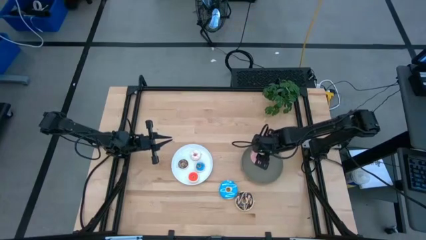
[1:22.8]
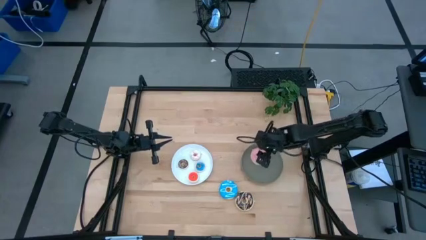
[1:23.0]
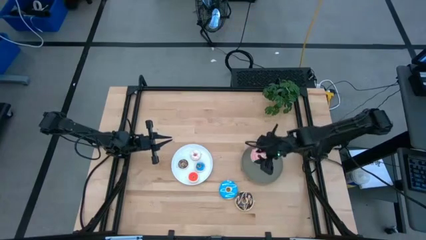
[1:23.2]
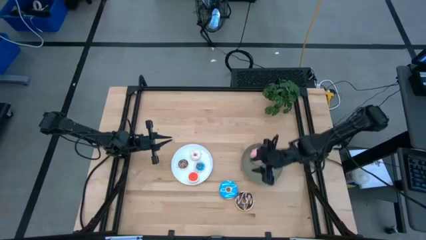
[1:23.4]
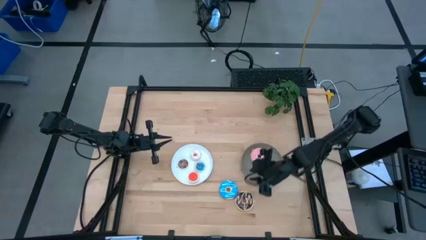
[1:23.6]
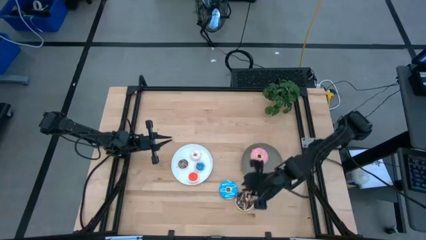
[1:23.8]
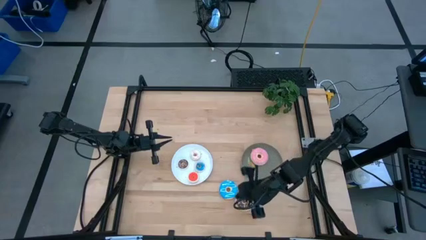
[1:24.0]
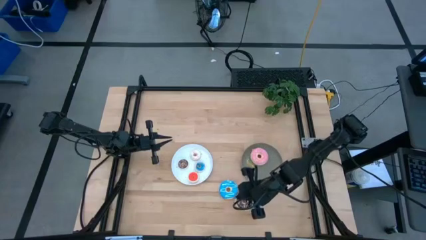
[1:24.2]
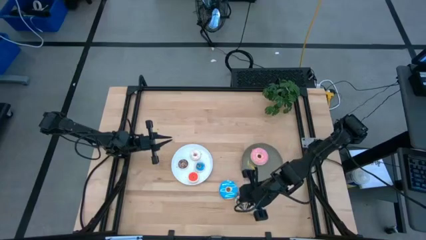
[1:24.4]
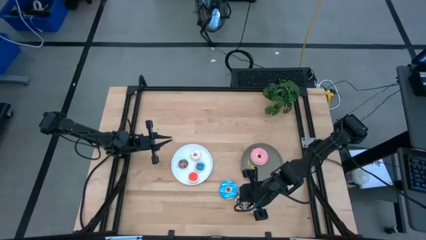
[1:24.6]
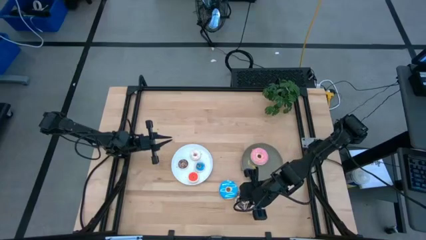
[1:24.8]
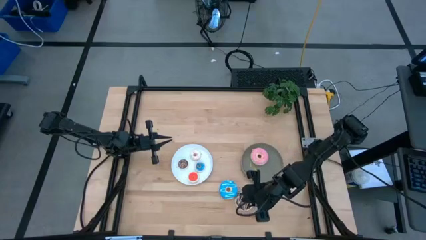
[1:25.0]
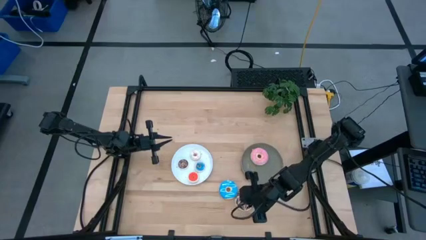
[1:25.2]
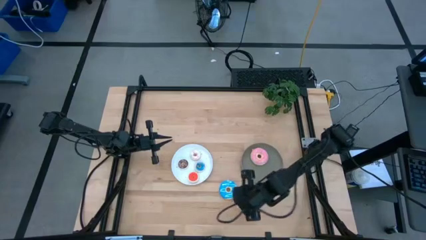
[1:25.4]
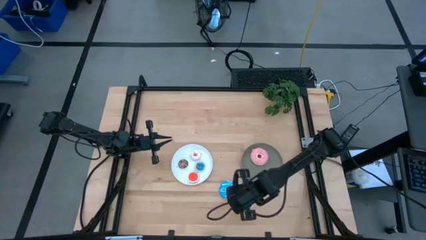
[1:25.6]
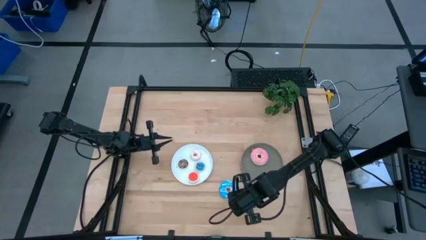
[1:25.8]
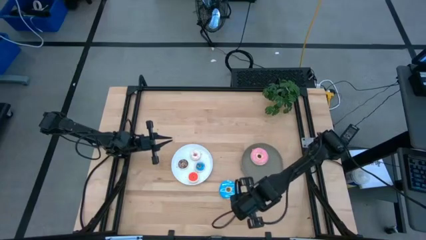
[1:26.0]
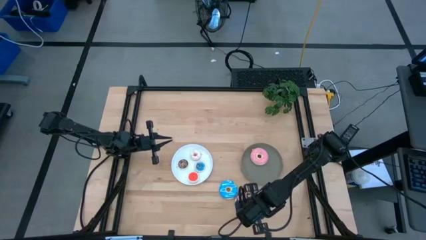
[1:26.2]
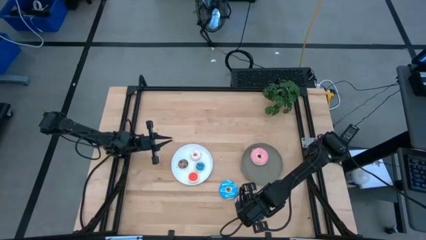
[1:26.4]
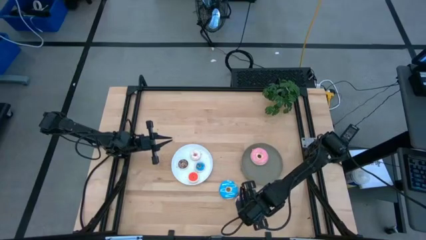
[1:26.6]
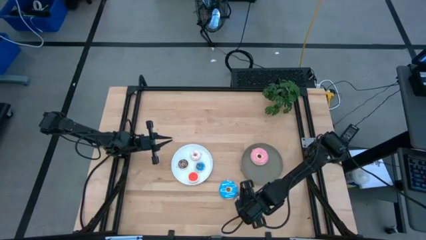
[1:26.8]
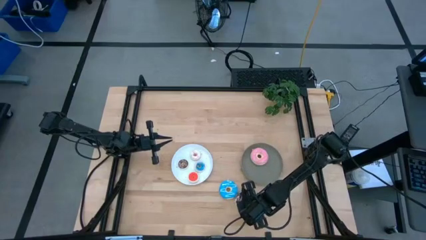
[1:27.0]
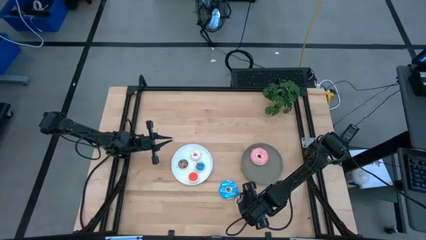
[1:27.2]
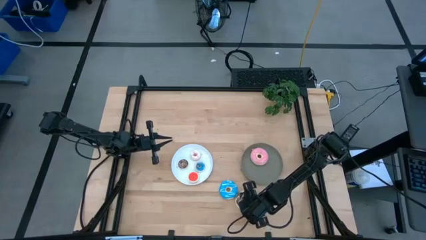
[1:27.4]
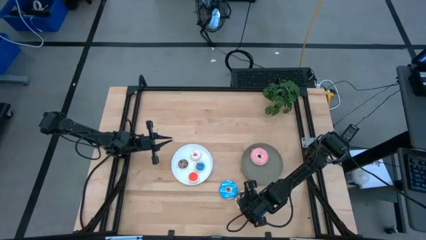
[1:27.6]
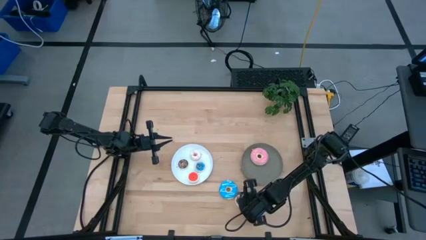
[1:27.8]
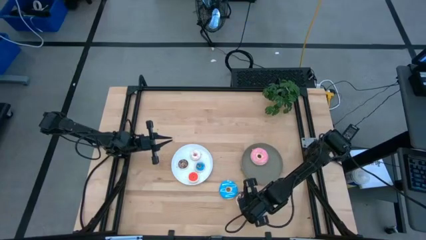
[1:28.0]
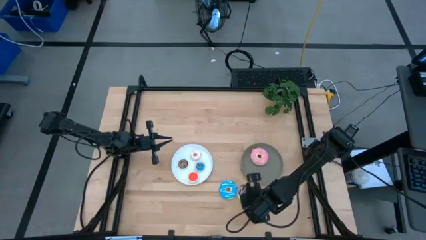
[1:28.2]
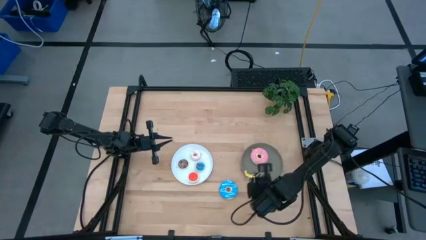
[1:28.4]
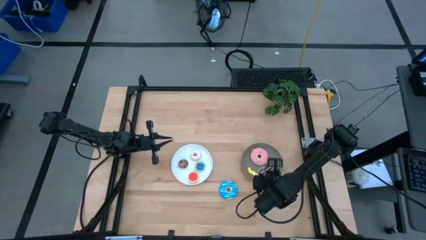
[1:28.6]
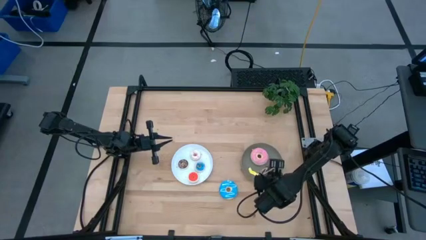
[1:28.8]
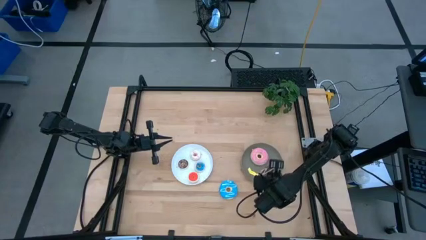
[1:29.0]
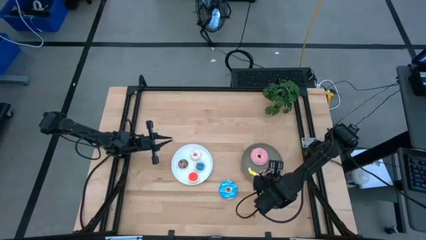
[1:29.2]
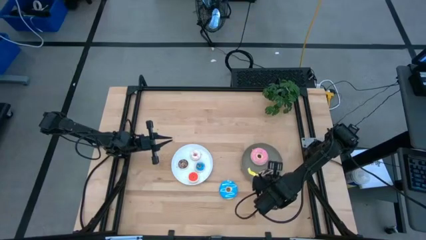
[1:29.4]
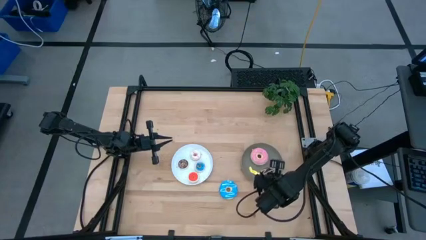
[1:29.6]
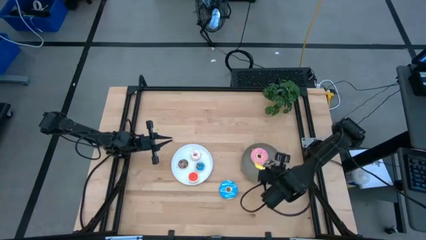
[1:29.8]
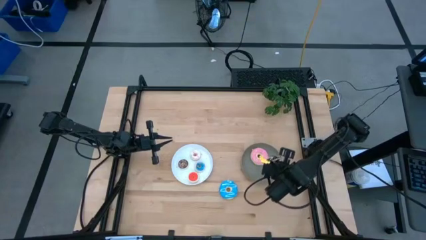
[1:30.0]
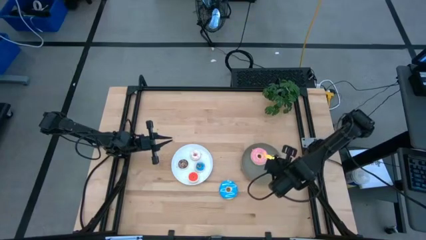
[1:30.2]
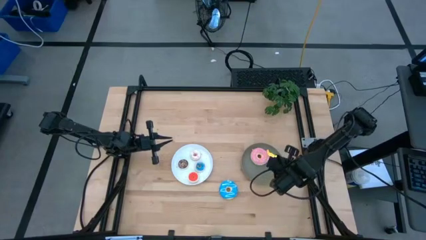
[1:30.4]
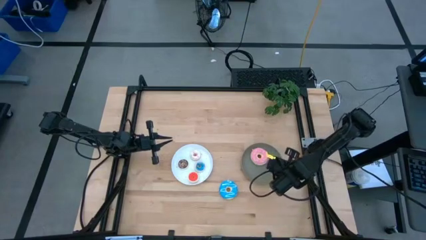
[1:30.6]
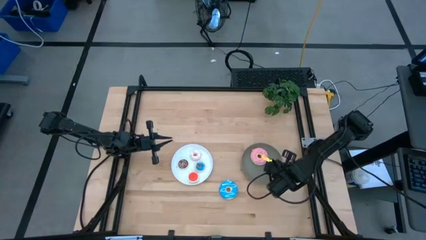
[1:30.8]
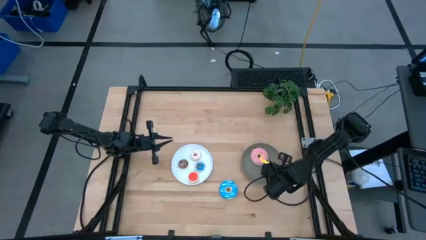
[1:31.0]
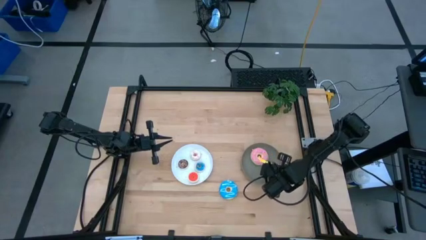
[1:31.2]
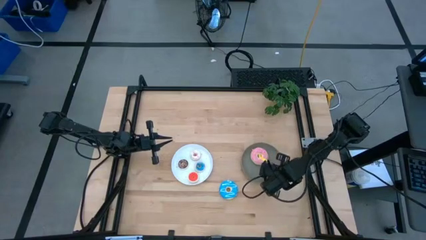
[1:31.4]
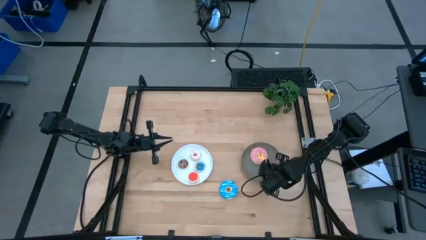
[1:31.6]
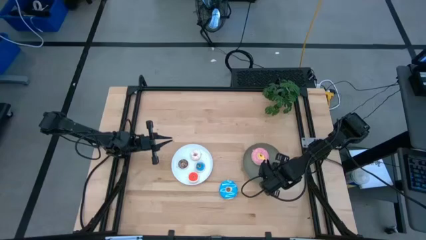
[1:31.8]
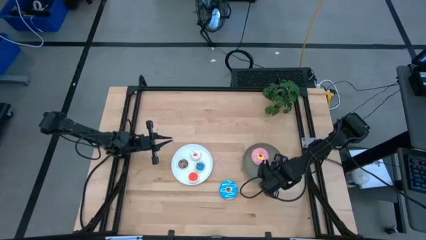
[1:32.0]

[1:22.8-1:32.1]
Task: Pick & Place donuts
Put the big black donut on the green plate

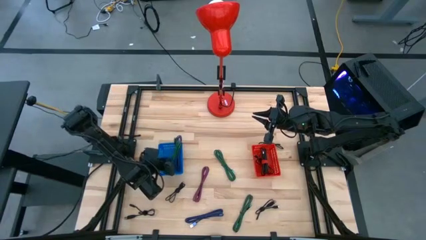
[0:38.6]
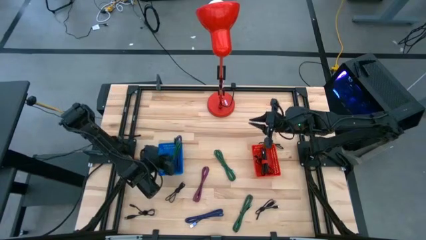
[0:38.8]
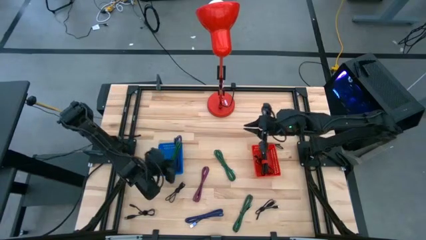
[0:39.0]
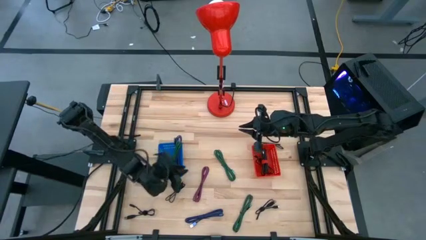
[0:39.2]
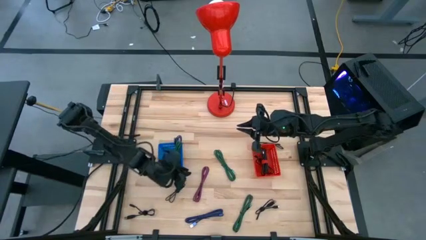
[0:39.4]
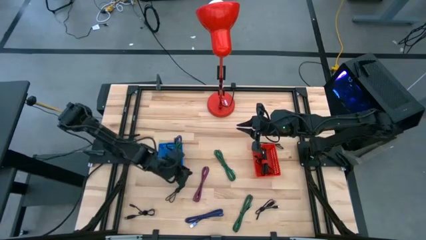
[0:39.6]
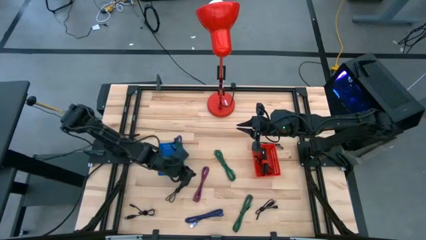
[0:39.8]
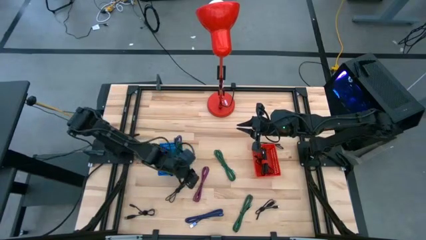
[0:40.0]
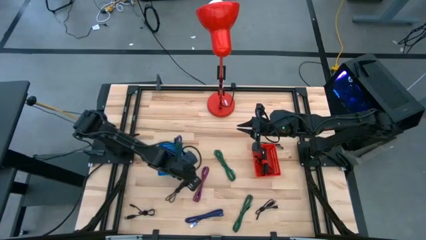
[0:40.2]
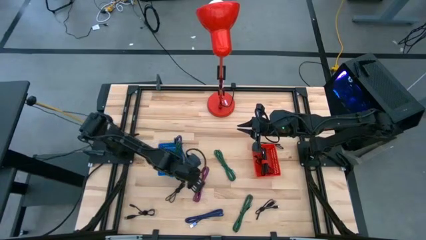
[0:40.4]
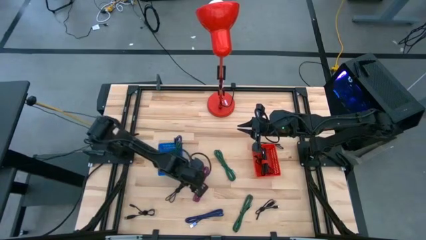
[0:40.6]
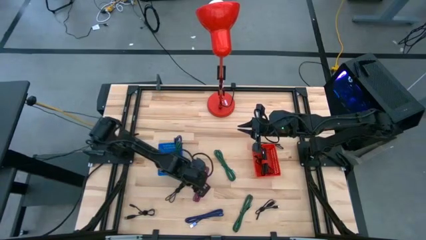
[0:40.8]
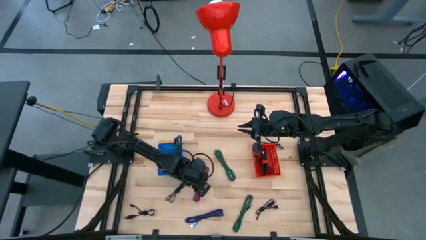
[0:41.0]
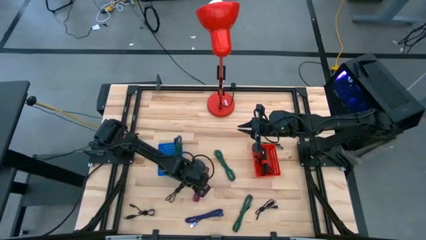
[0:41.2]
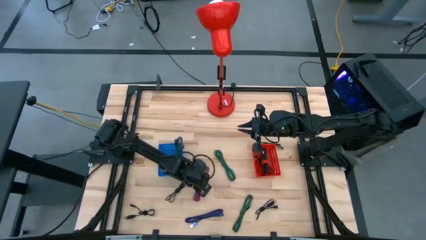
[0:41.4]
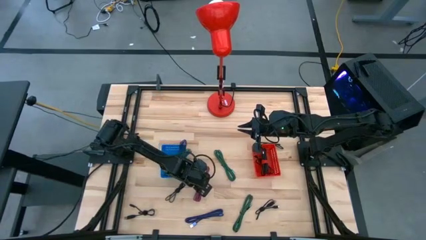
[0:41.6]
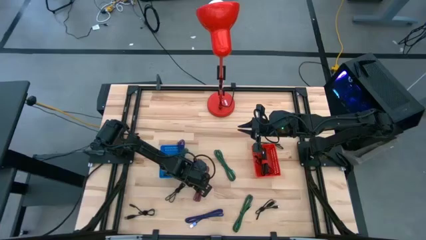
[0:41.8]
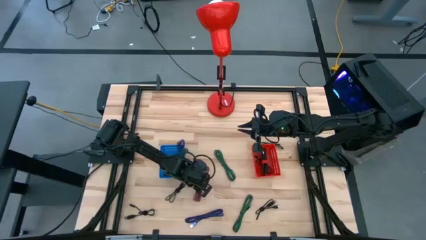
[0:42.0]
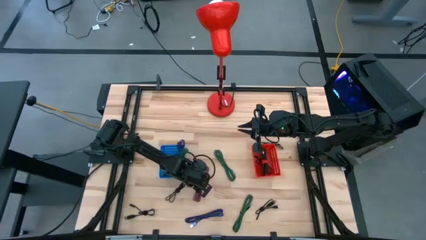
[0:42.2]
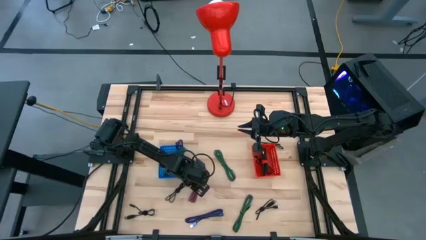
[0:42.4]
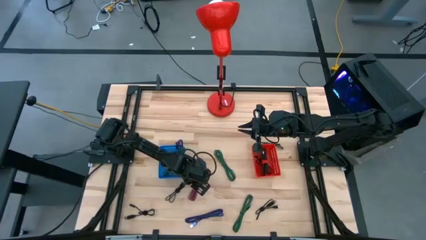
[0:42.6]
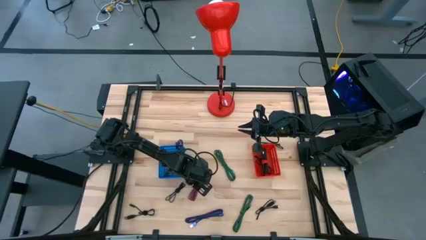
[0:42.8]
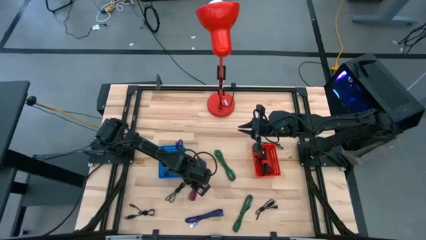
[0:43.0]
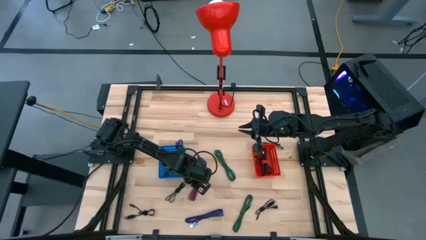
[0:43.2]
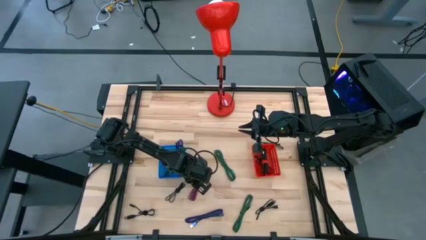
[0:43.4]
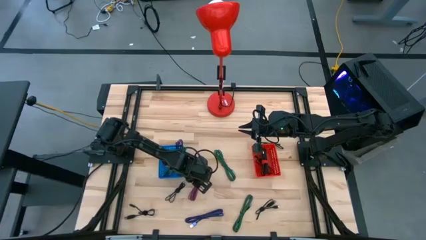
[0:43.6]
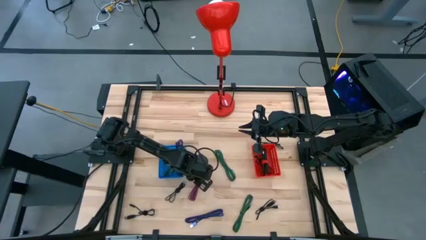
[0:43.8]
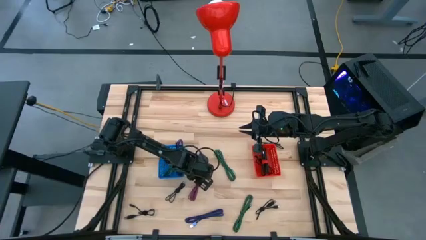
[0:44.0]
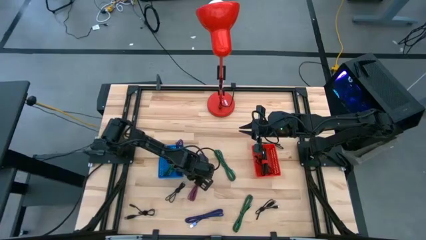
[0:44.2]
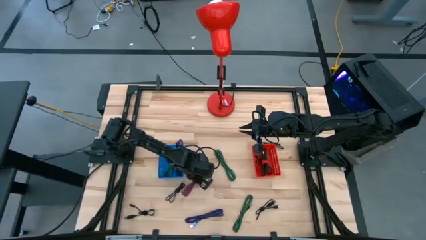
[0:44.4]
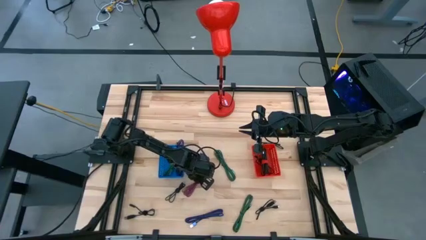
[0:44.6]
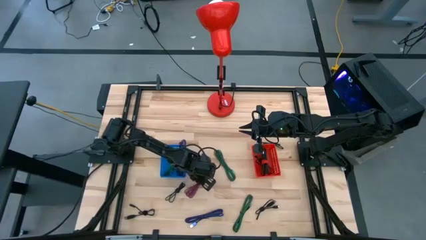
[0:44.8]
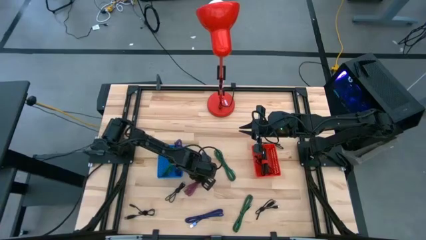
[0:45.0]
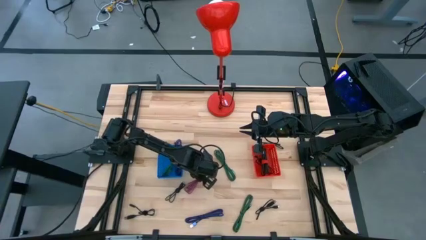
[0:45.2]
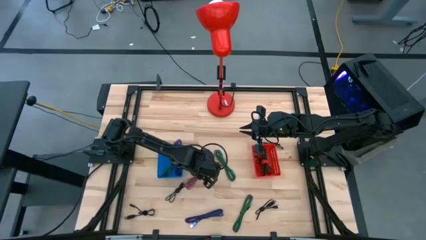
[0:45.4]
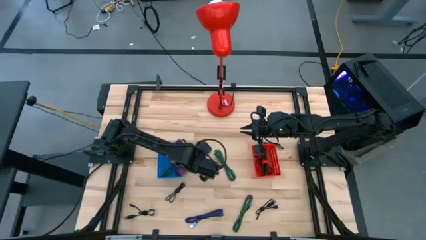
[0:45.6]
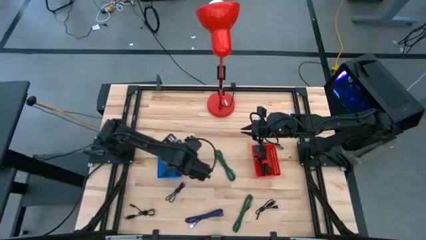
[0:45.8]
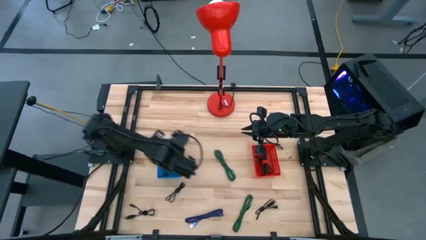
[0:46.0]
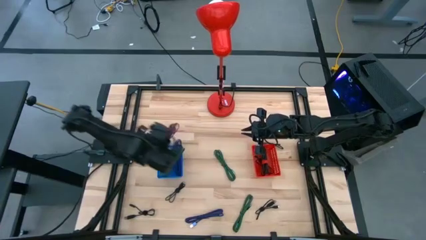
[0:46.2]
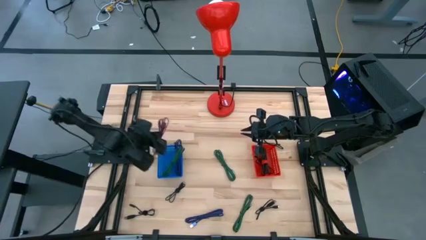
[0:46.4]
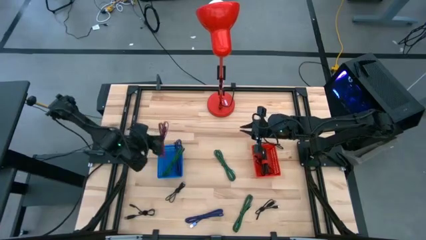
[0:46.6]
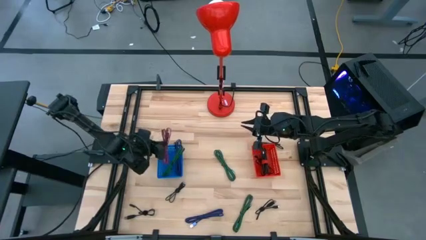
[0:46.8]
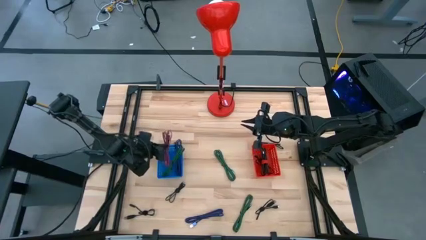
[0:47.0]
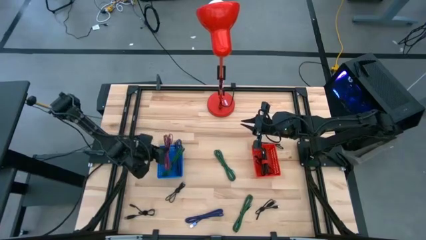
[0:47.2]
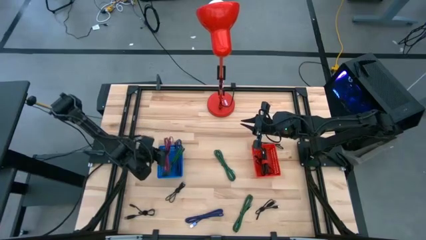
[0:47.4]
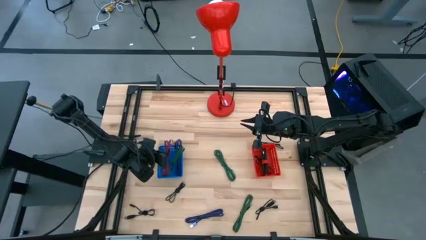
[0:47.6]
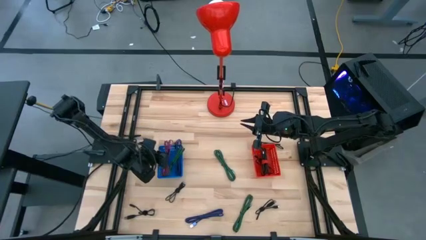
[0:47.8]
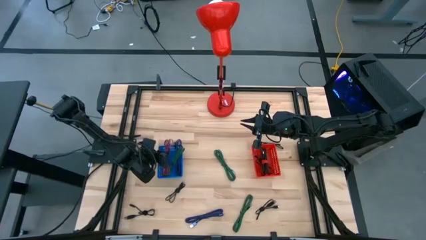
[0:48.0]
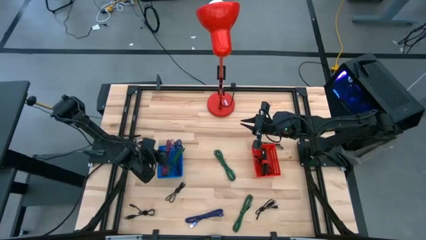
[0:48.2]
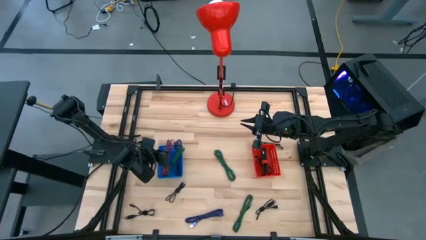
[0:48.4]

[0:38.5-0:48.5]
Task: Pick & Place USB Port
Put the pink and black charger cable into the blue bin
